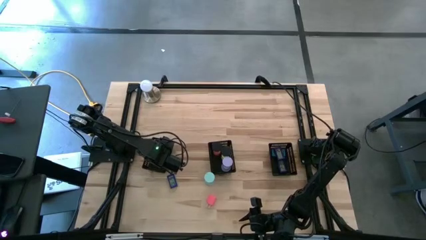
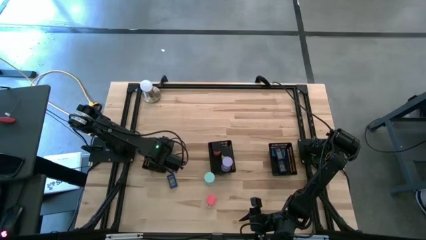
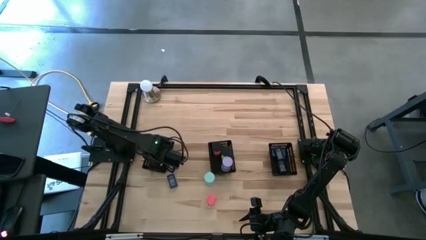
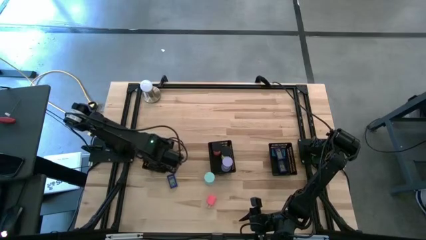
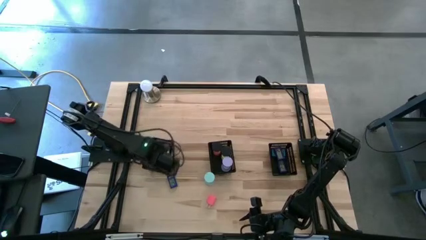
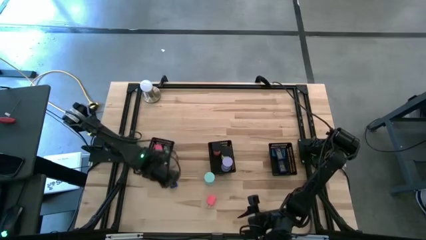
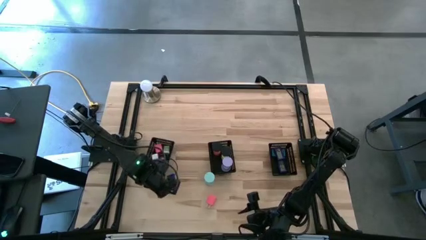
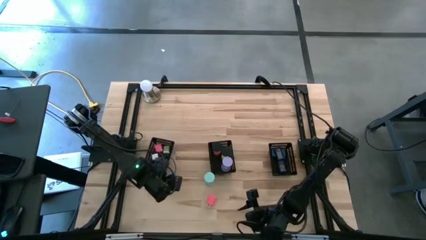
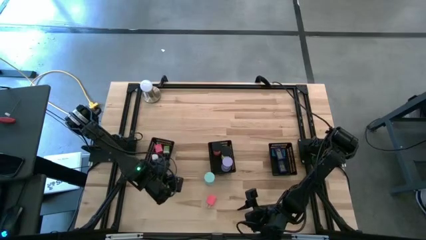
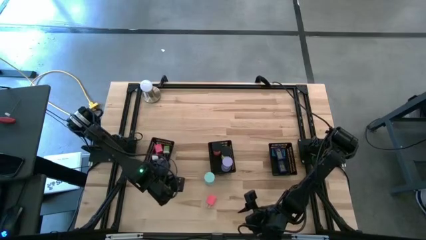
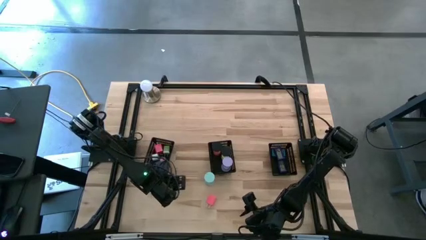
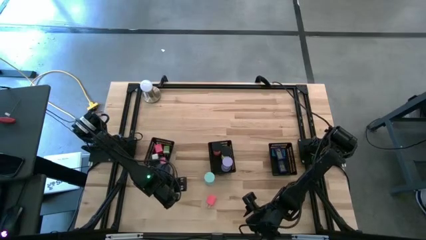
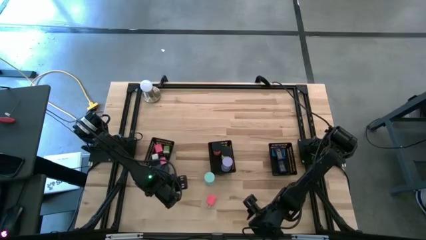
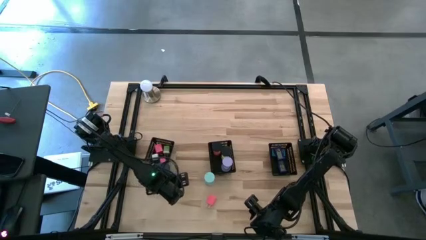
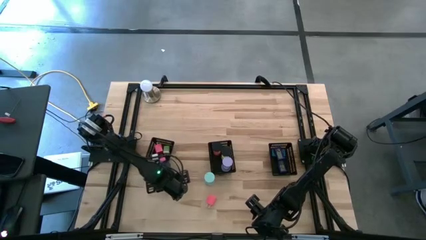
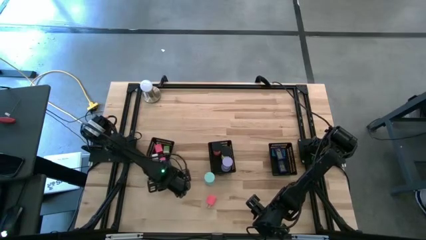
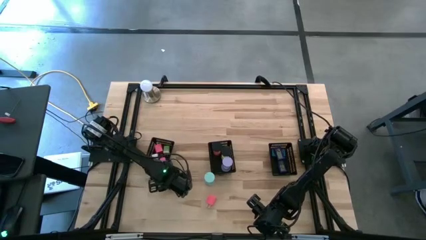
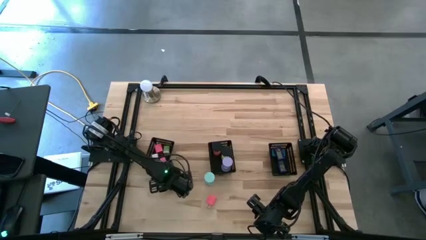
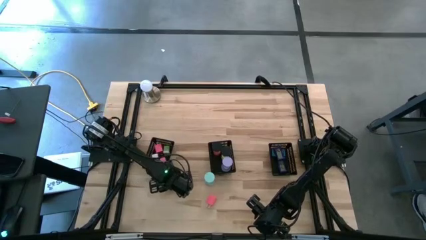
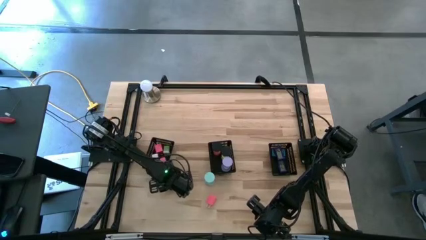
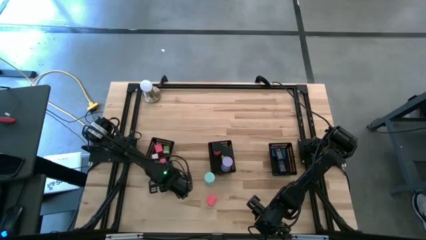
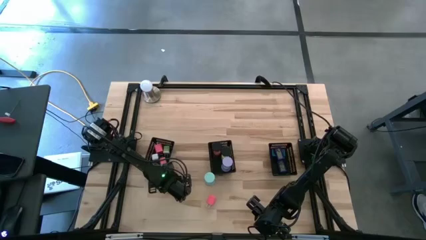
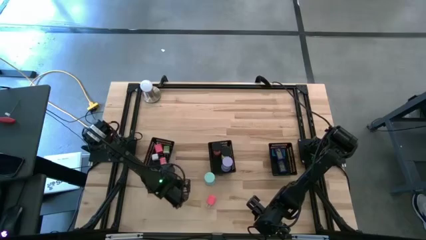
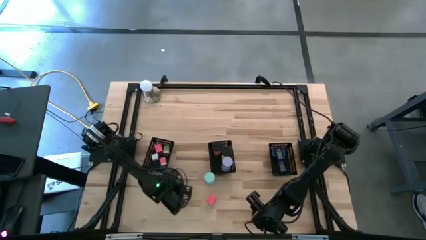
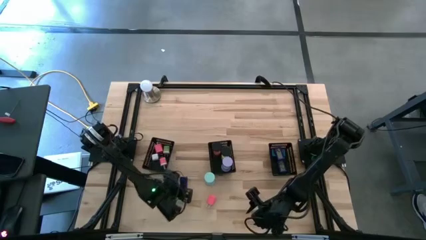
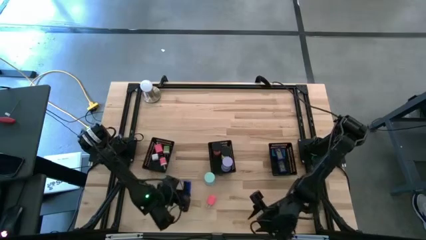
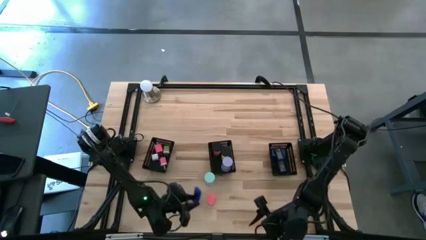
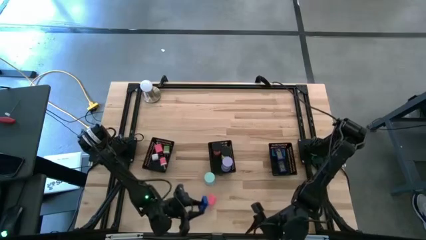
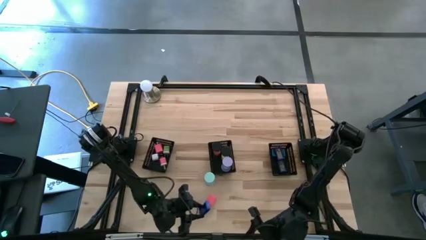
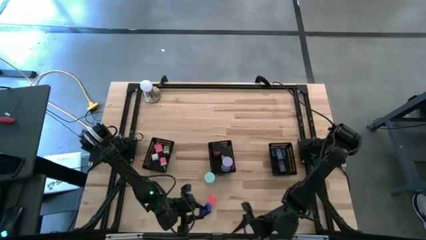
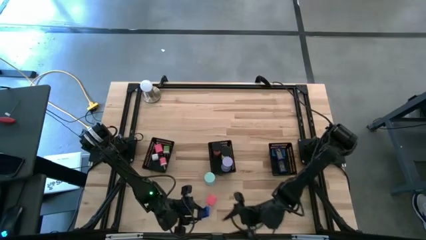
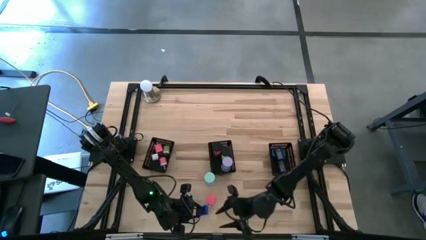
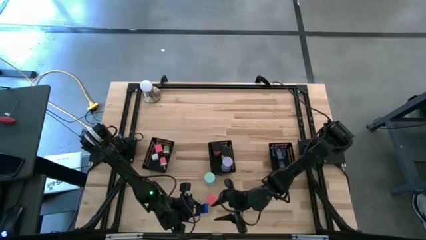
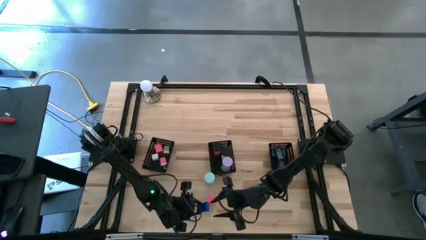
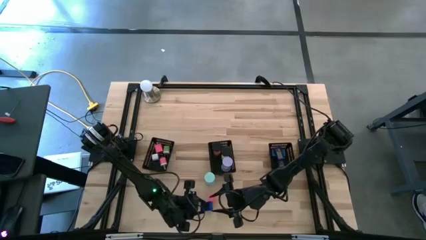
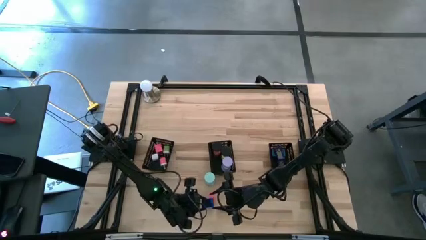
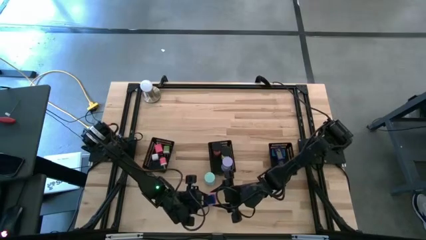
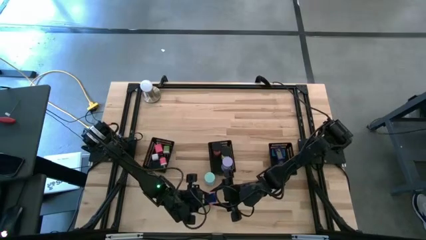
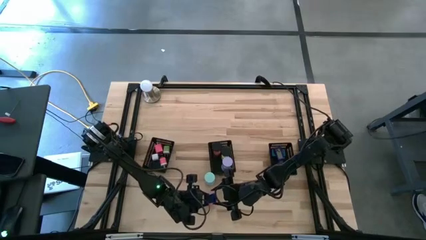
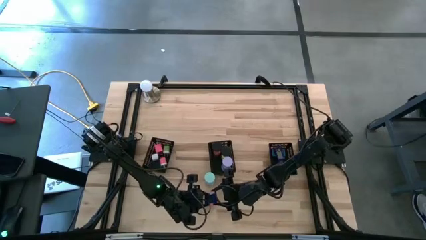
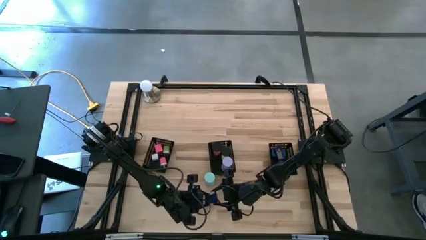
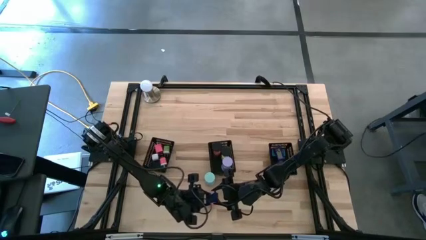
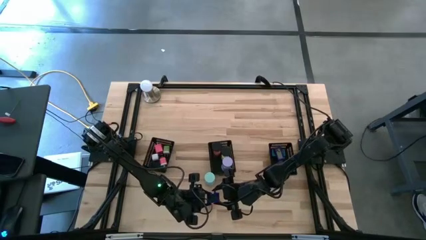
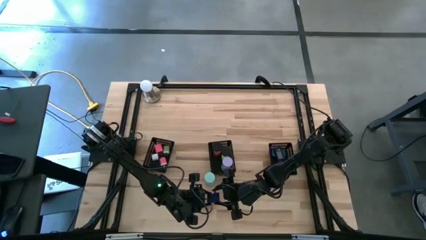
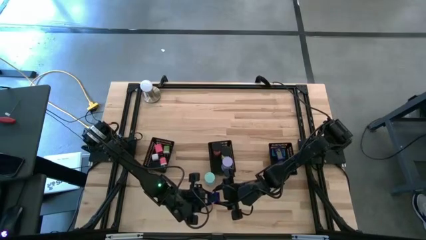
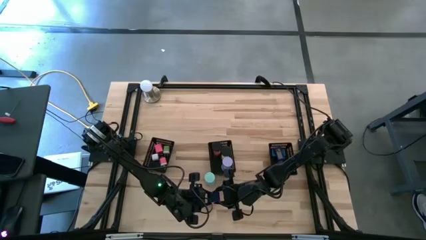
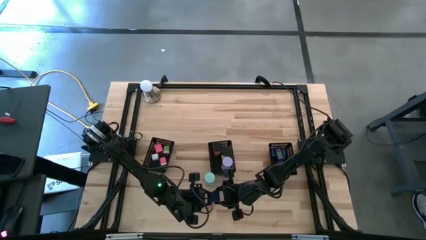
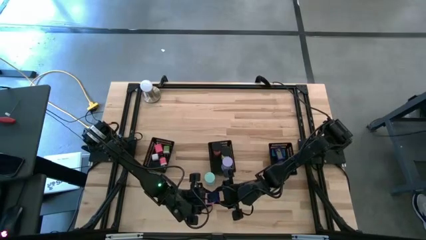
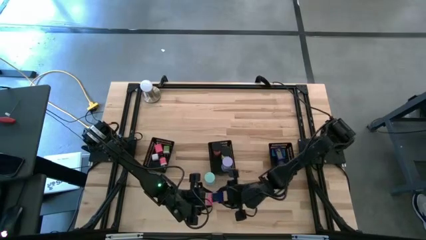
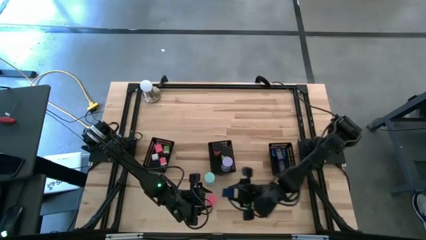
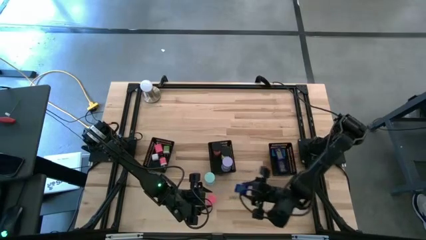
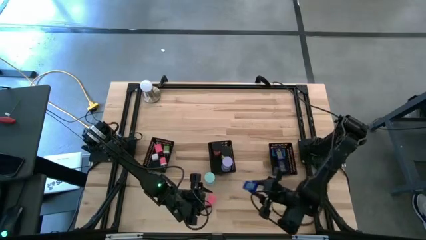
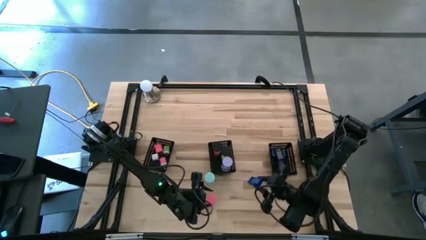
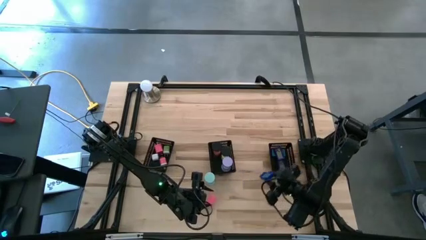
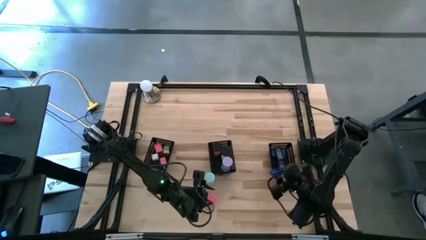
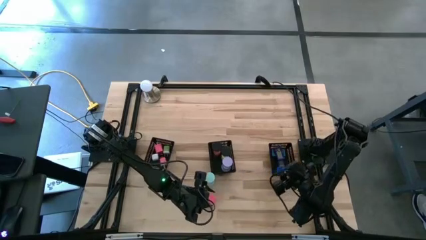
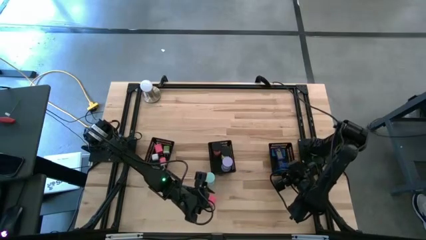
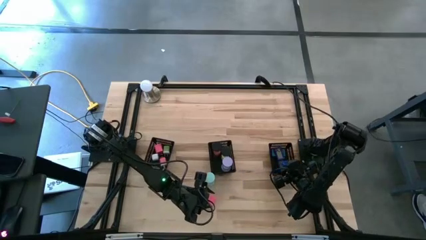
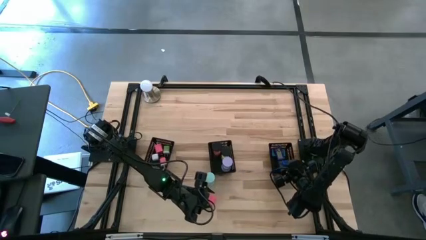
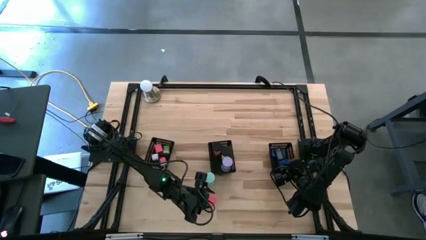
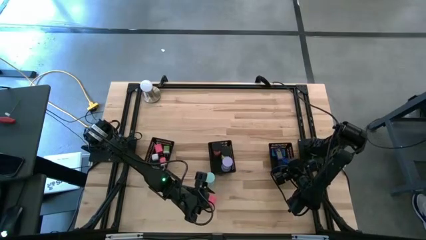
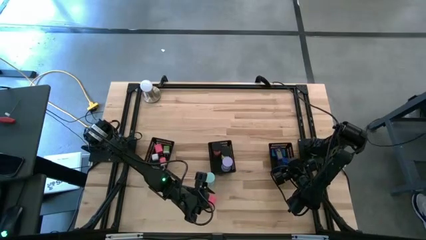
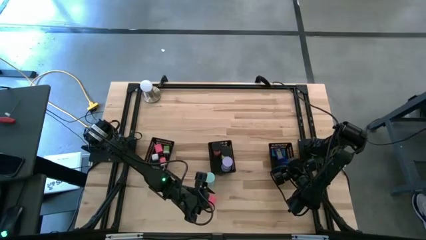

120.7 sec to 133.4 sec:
Task: Pick & Place Office items
Put the blue digital clock into the right black bin

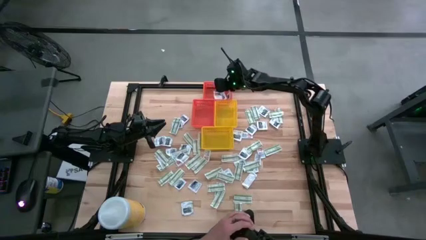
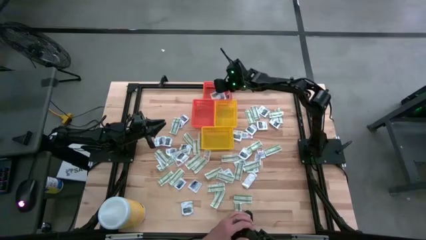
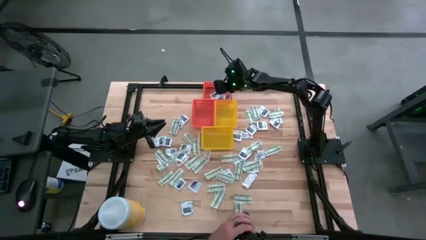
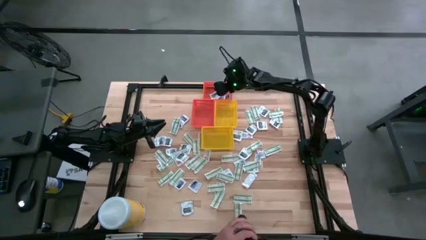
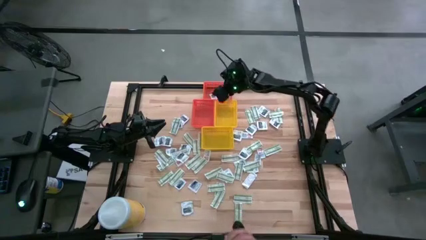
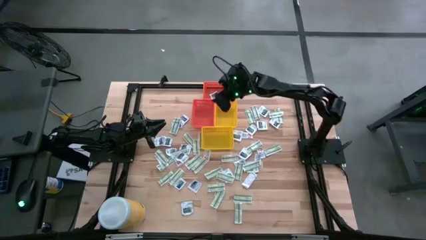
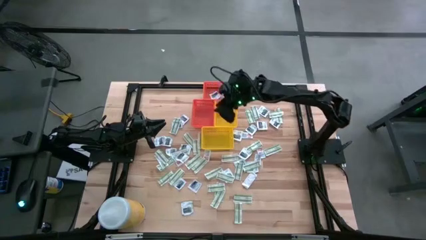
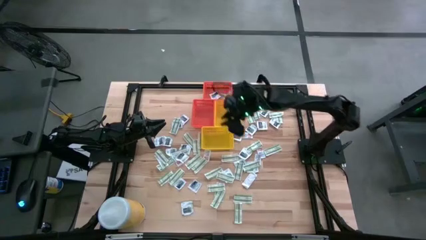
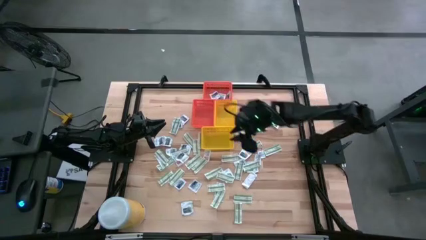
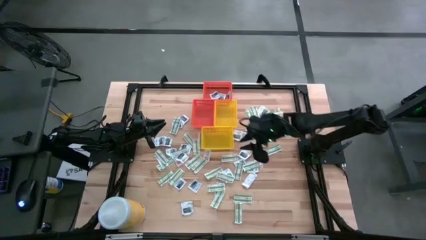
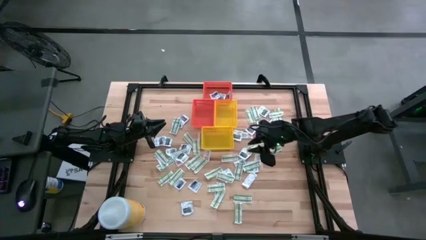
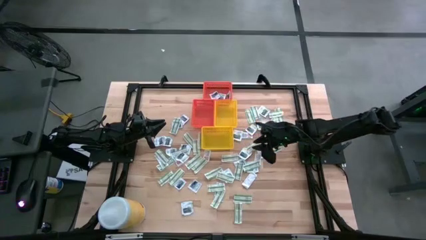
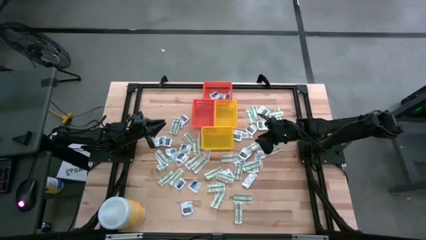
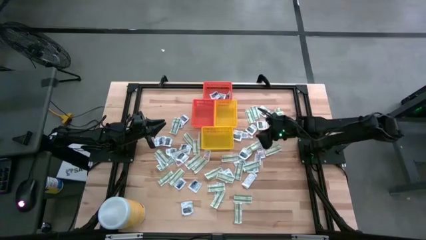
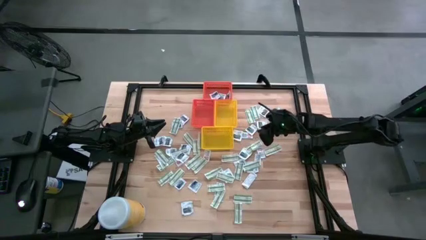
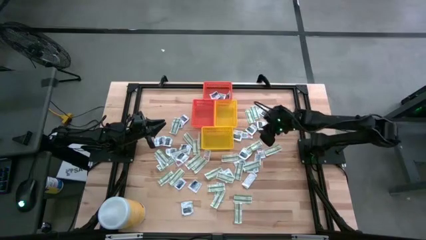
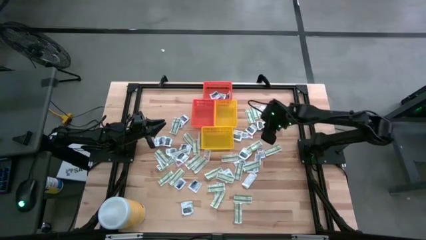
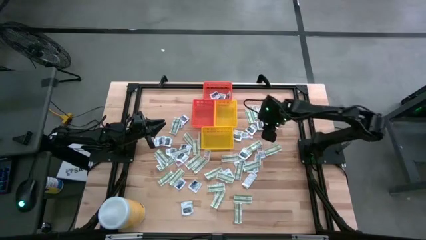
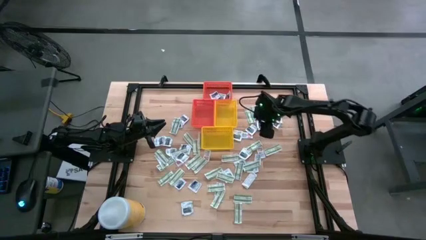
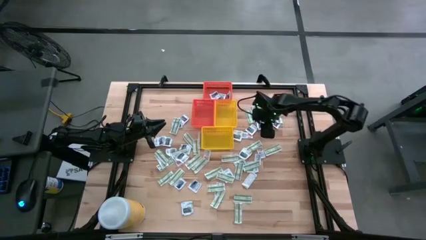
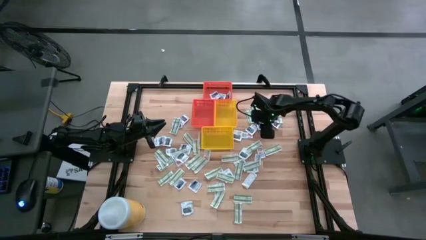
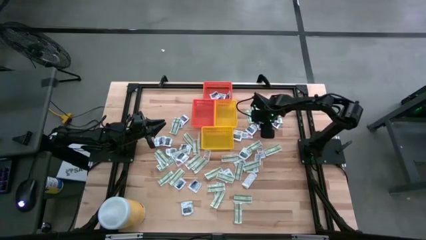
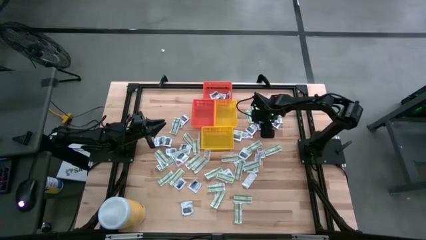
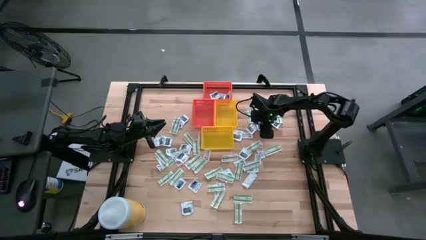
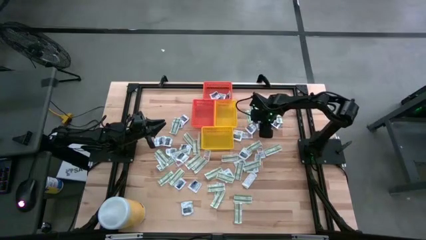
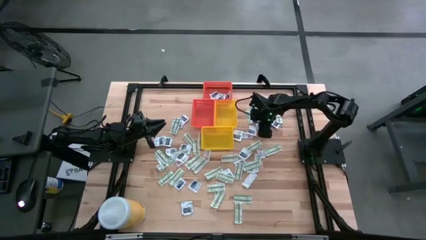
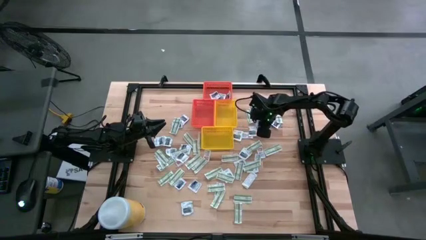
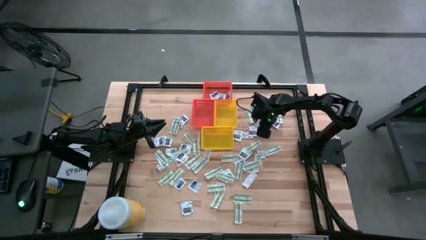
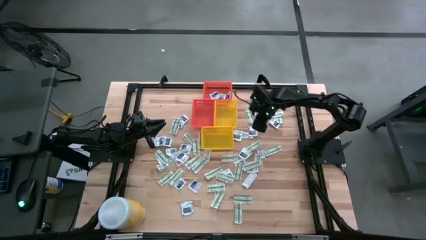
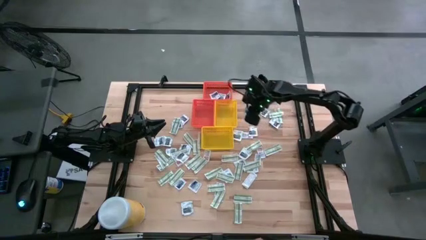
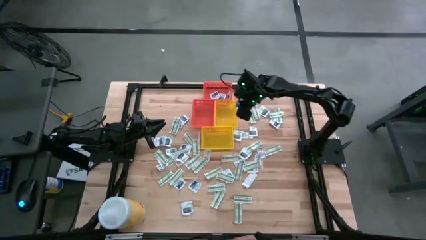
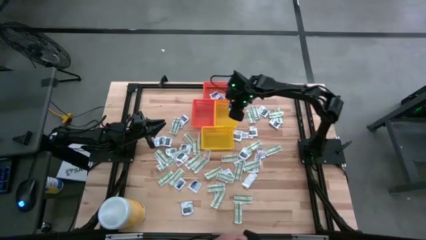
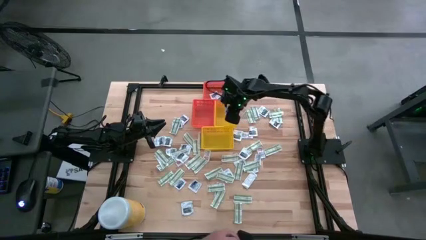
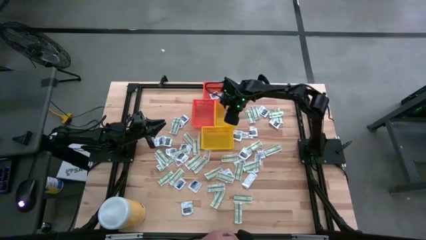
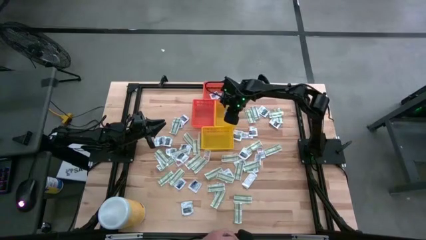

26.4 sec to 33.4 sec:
Task: Pick & Place First Aid Supplies
Put the towelette pack into the top yellow bin
